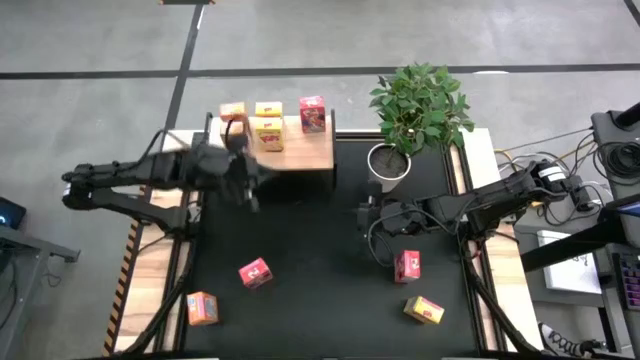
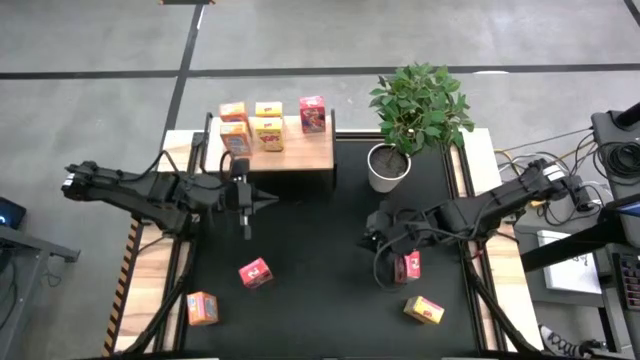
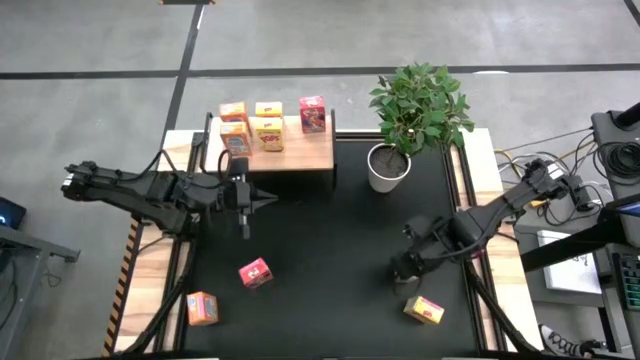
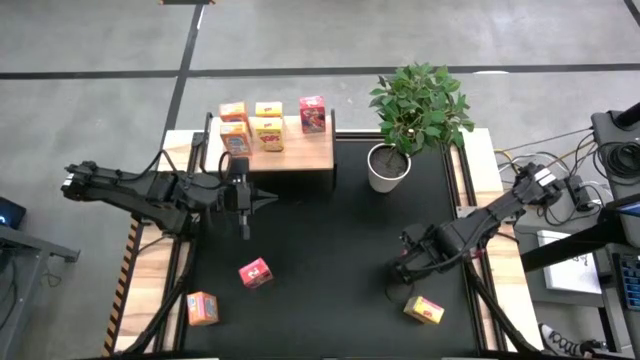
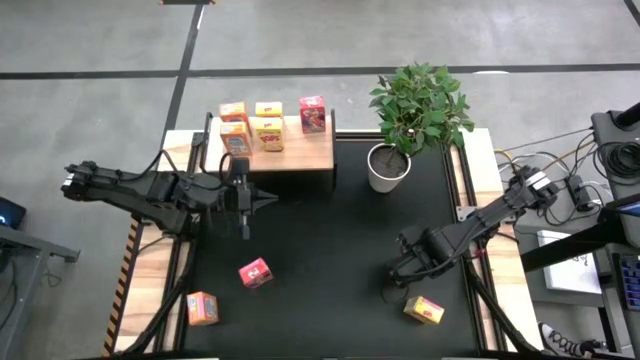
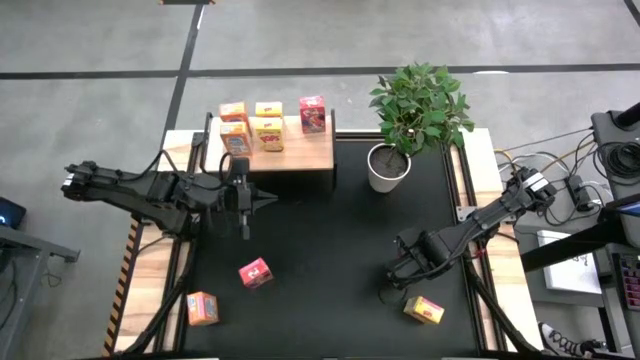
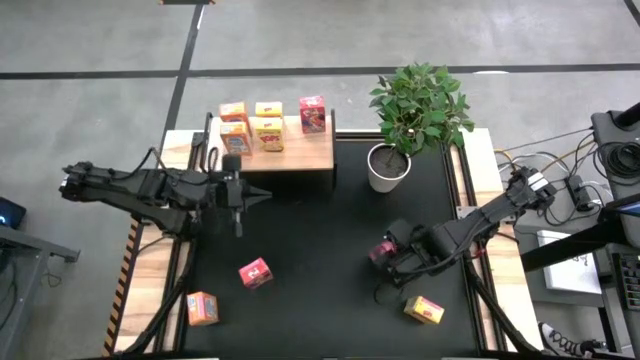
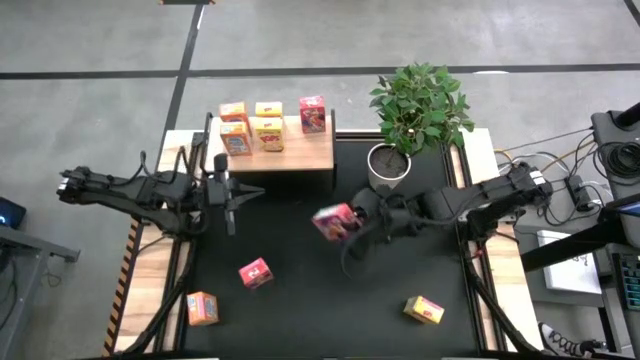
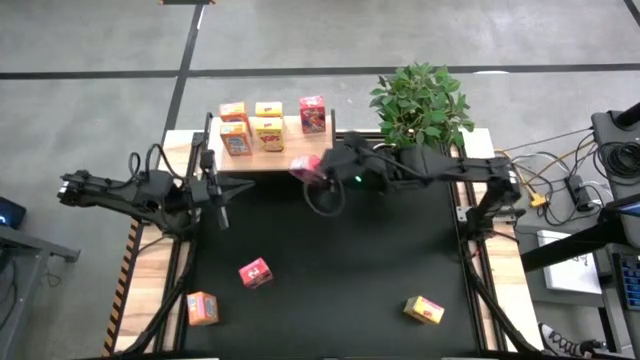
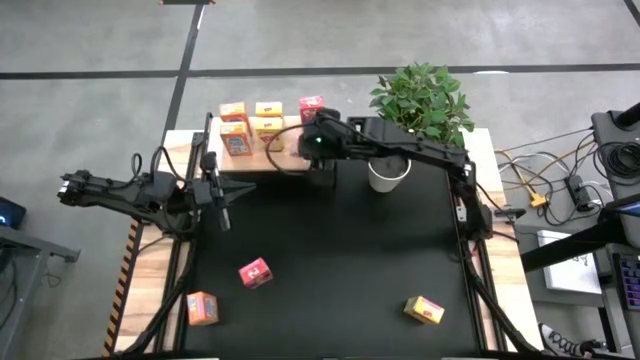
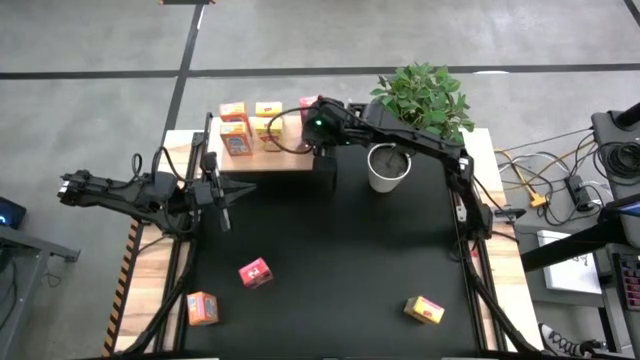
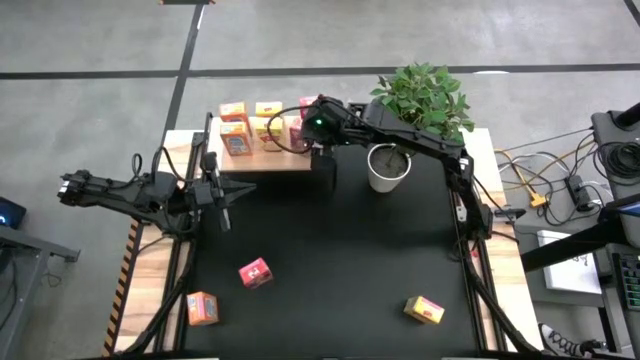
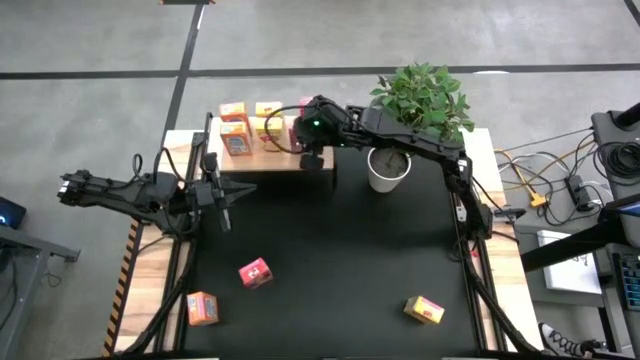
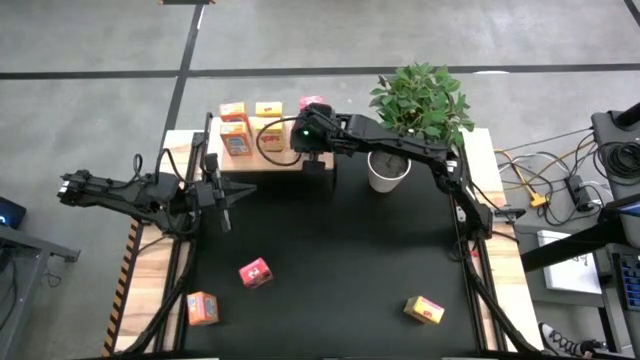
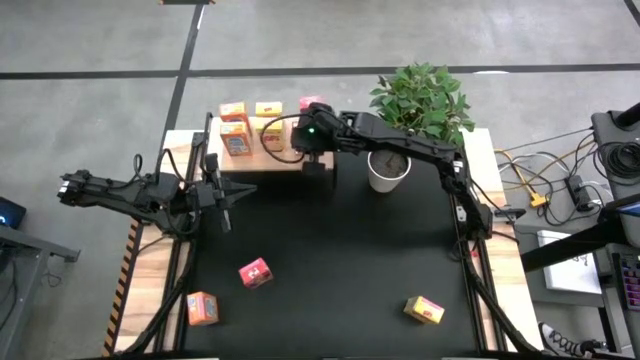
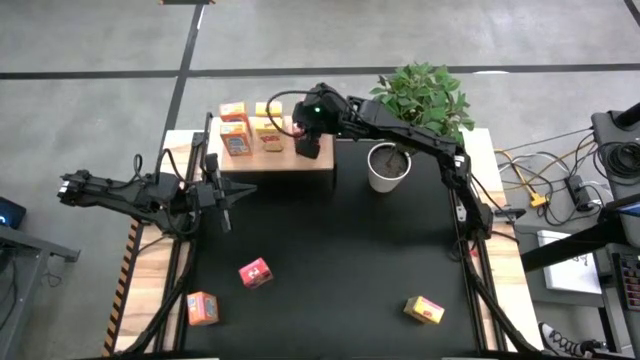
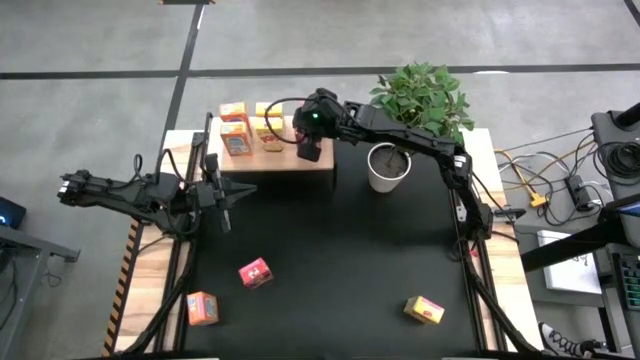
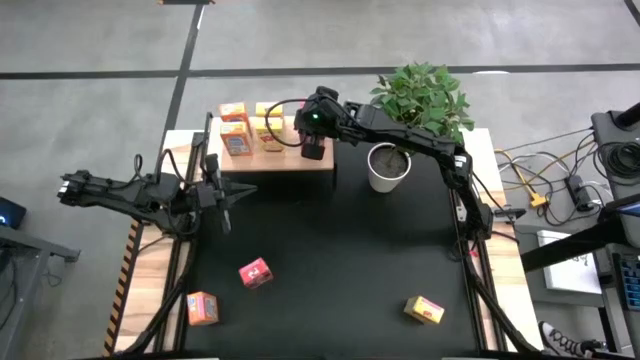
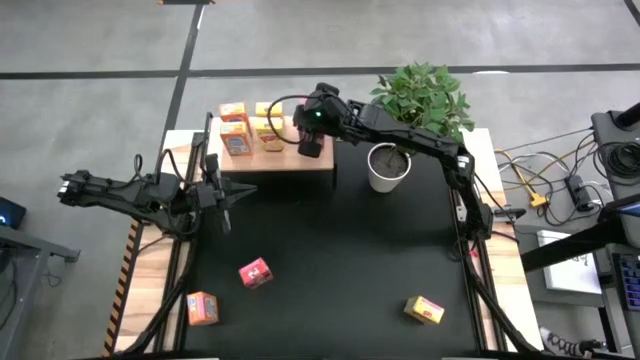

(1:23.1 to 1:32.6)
Task: Stack cereal on shelf
Put the right red cereal box on the shelf

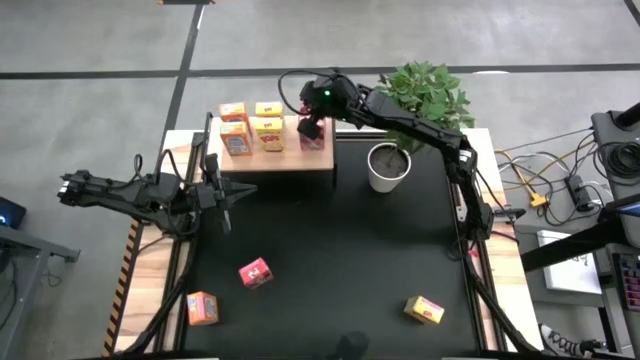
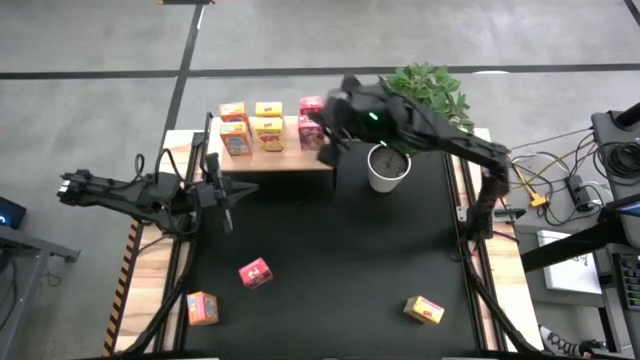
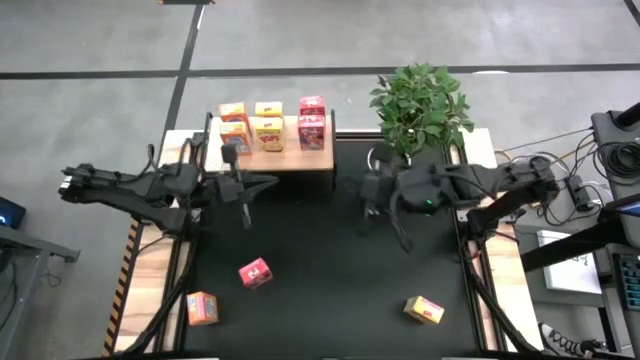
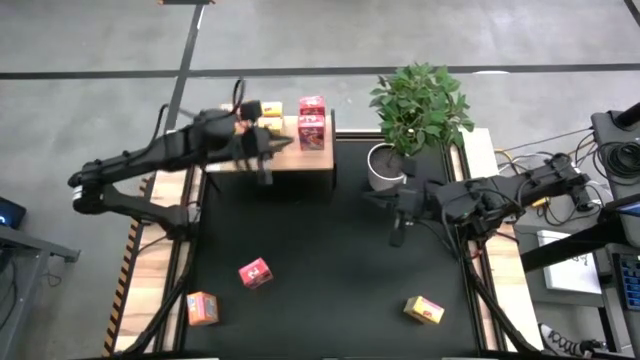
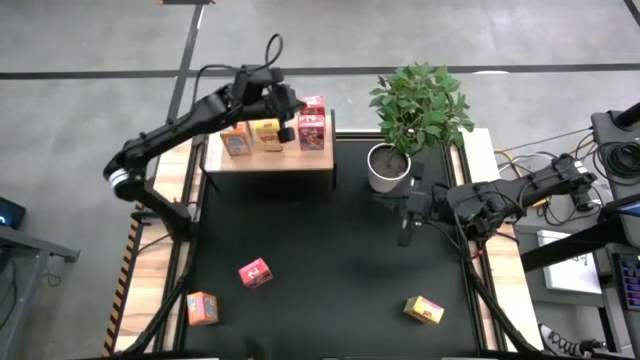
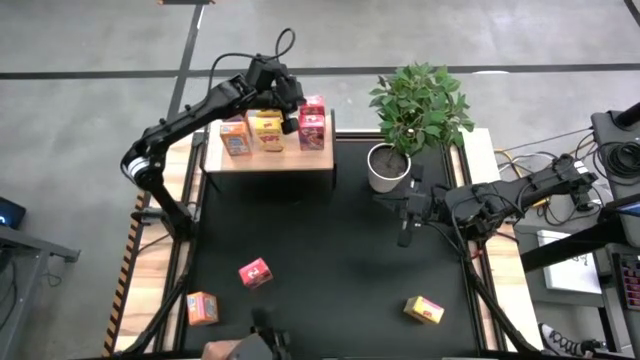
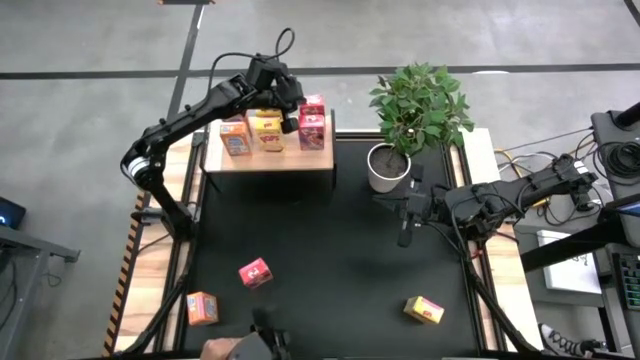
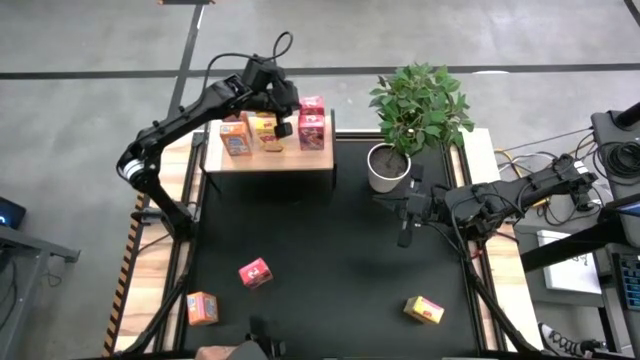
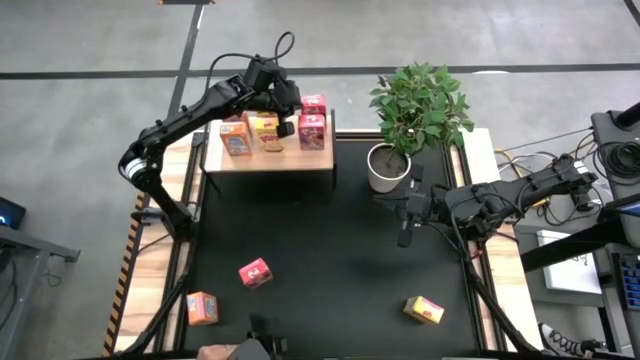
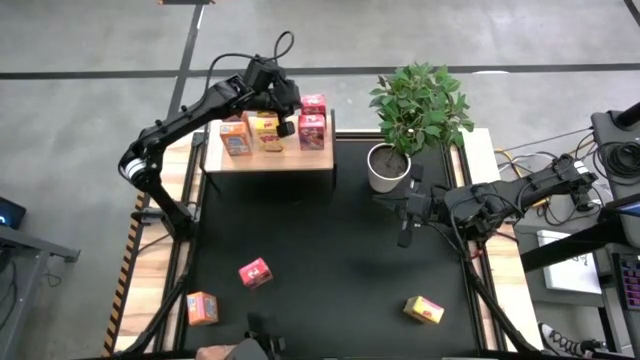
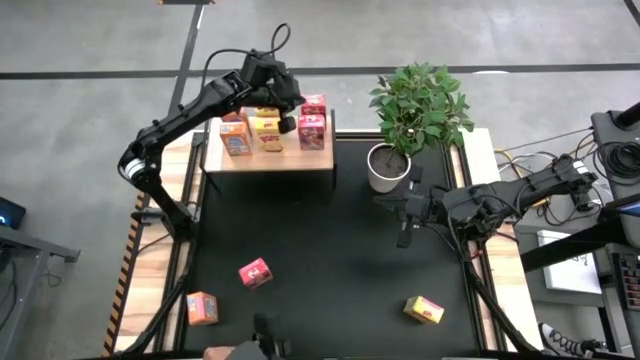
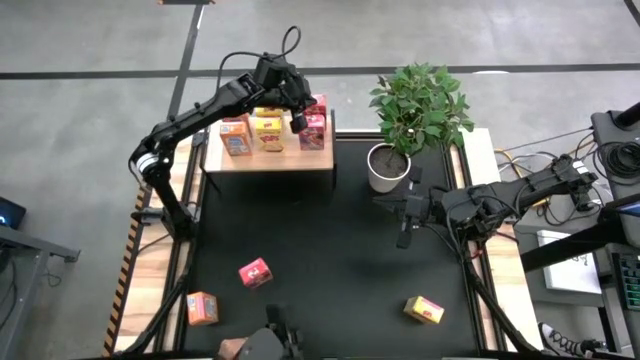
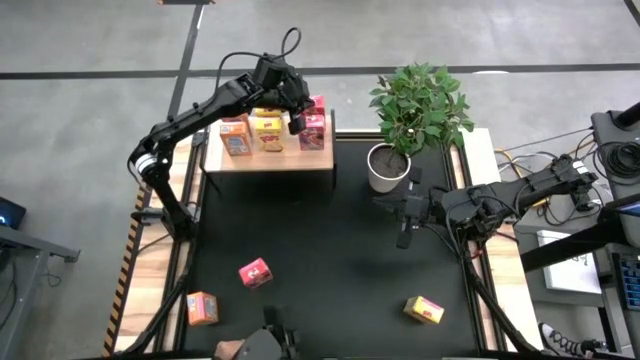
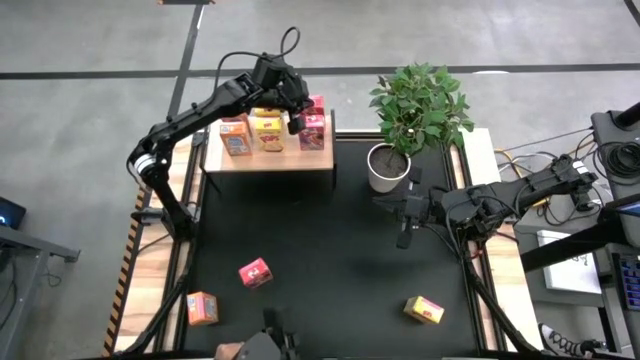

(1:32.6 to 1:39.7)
Adjust the red cereal box

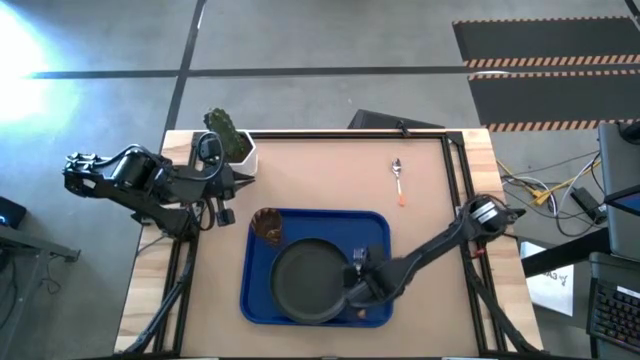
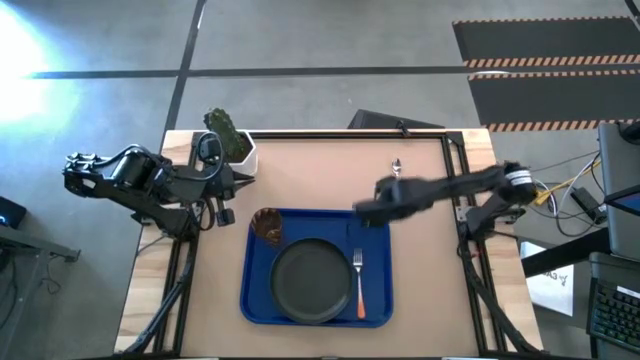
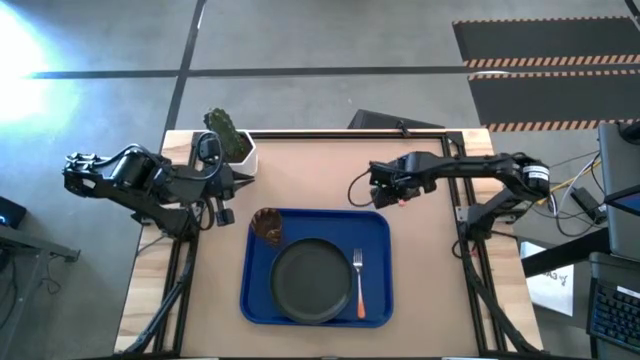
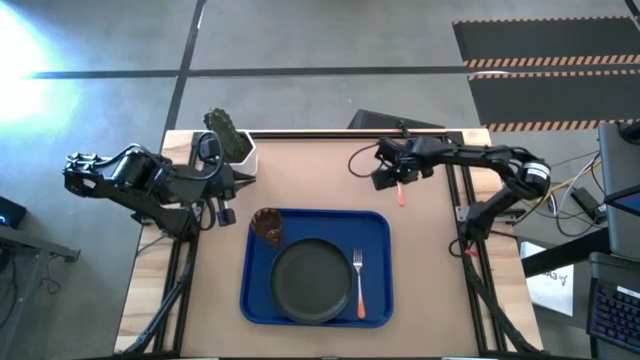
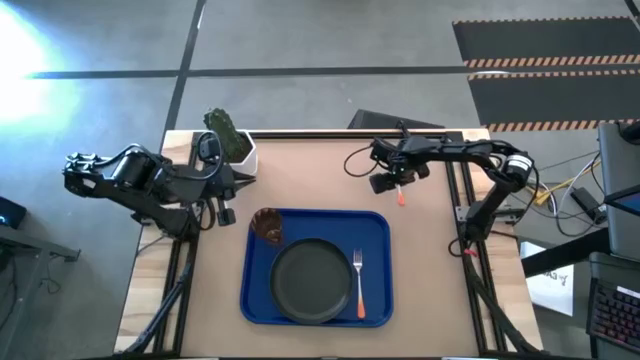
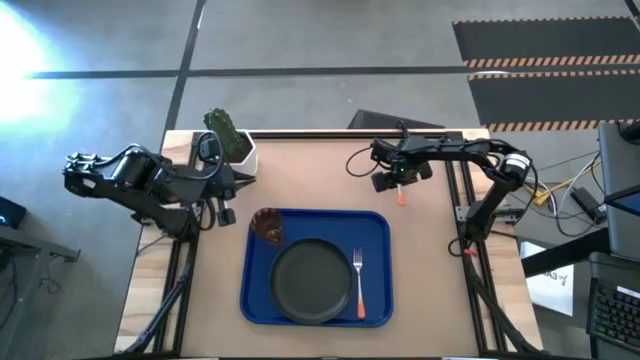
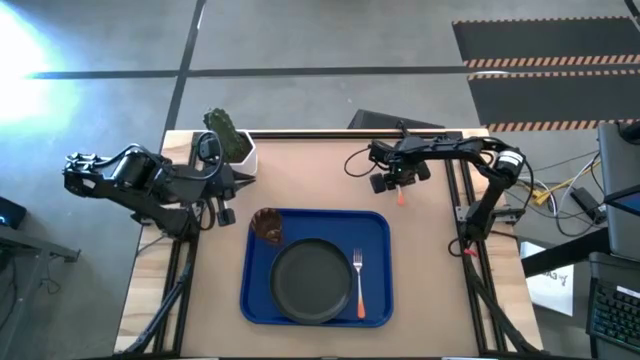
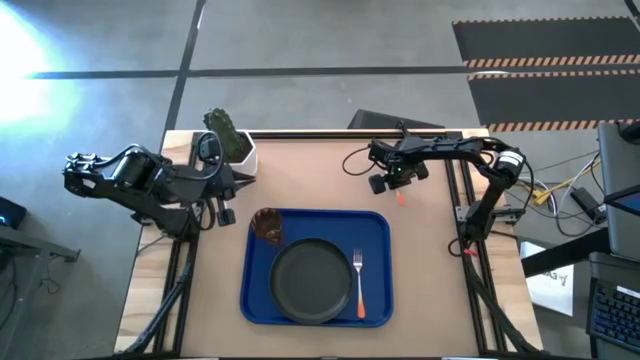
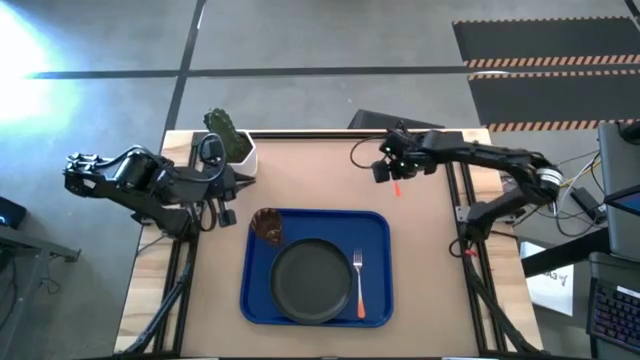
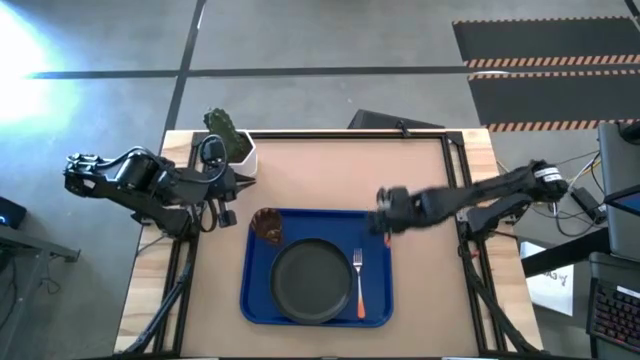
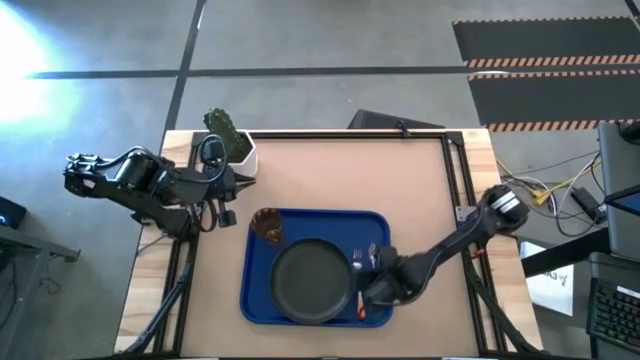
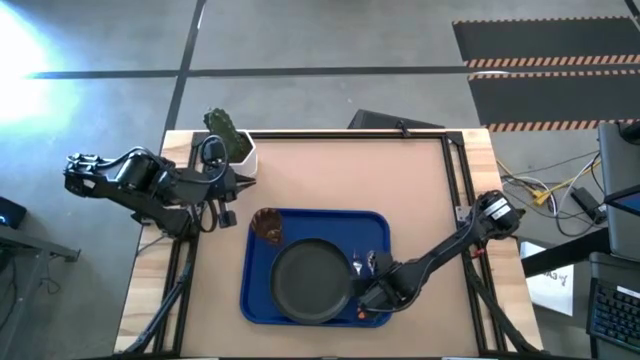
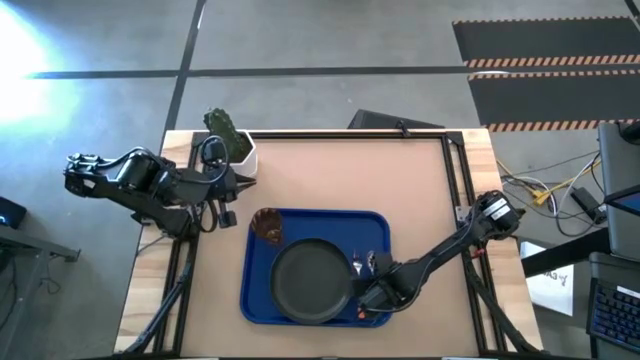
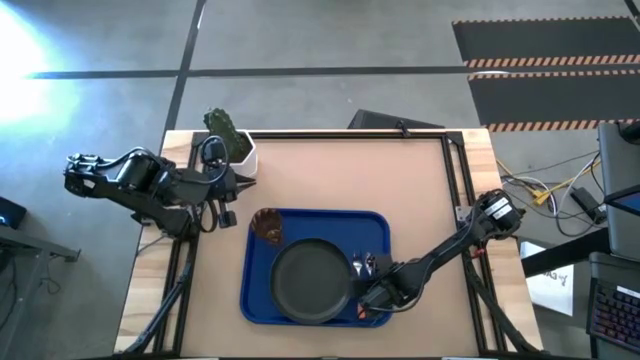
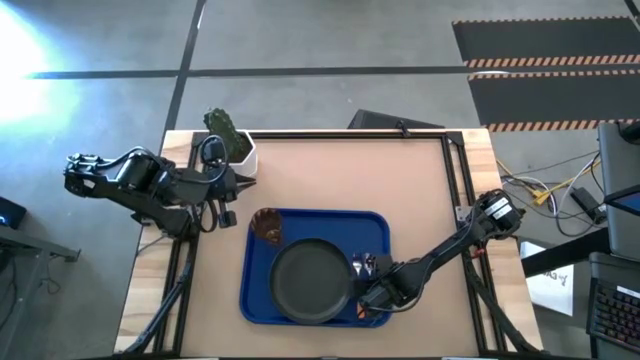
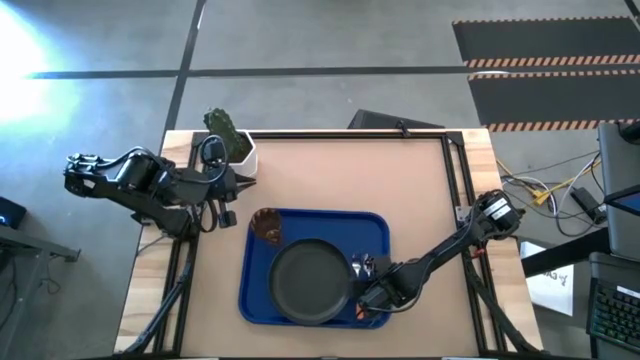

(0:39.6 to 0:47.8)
Task: Pick and place plate/cup/fork/spoon on tray
Put the orange spoon on the blue serving tray to the right side of the orange fork
